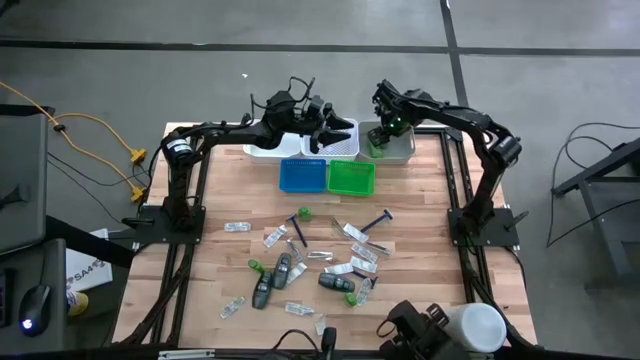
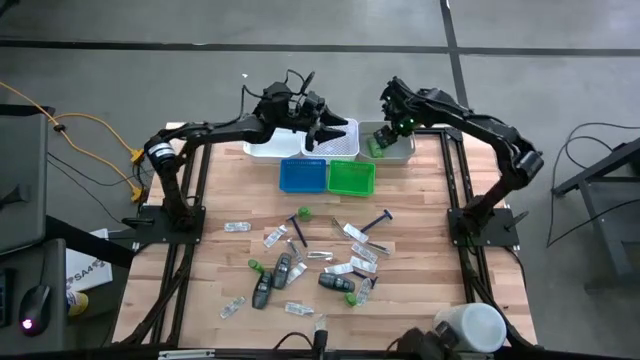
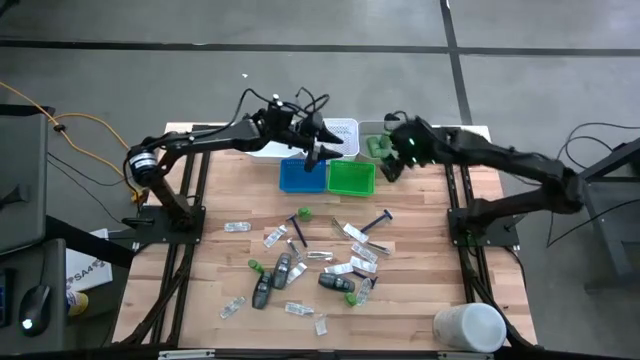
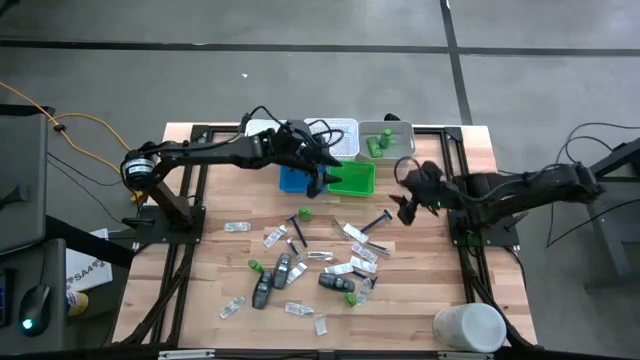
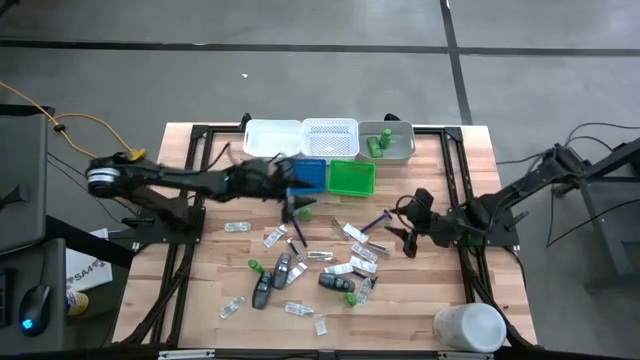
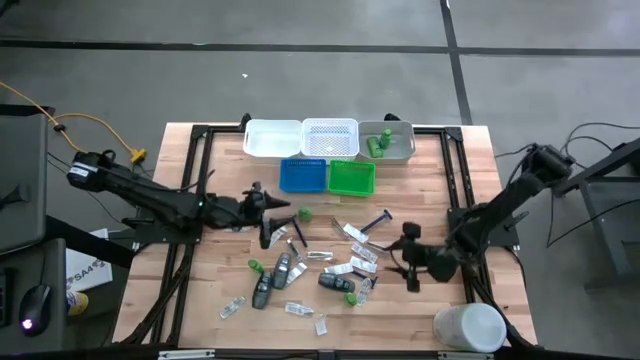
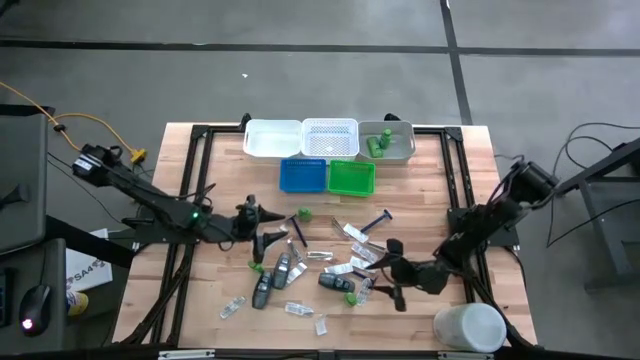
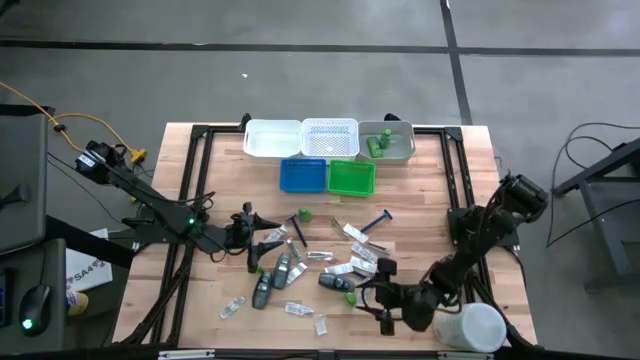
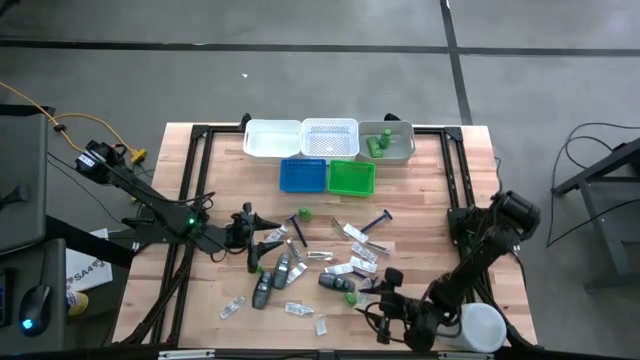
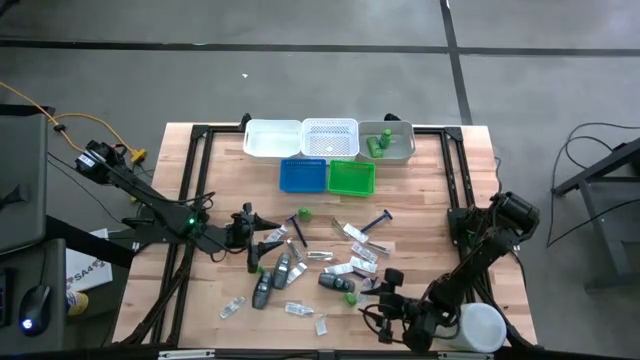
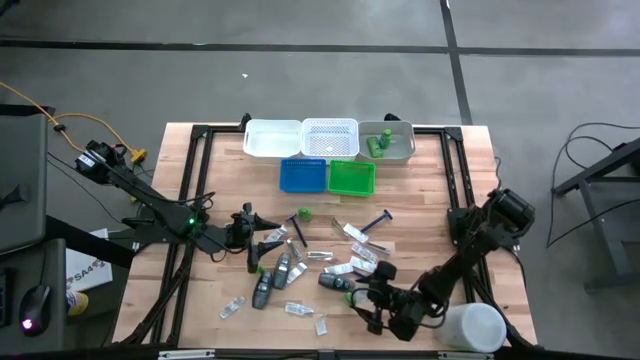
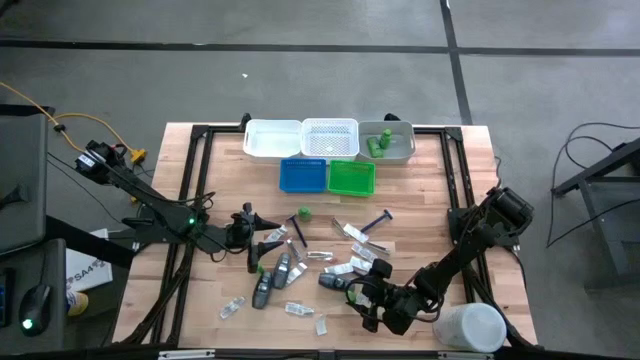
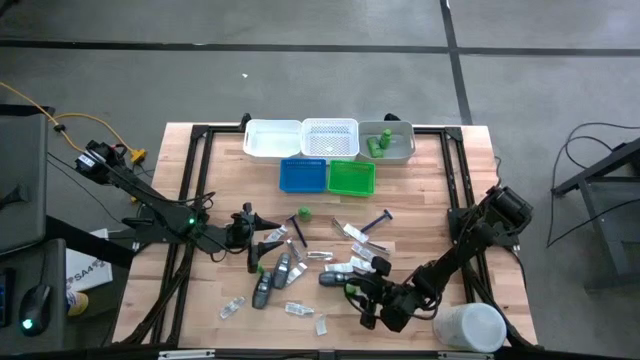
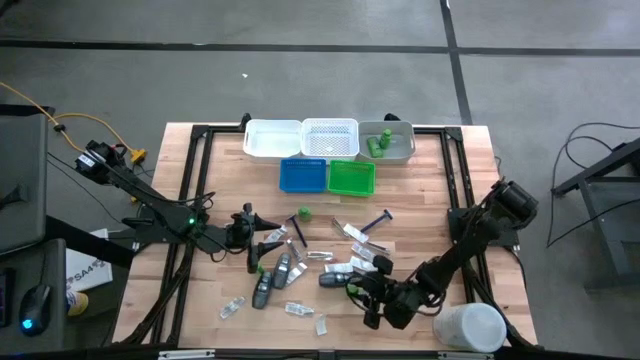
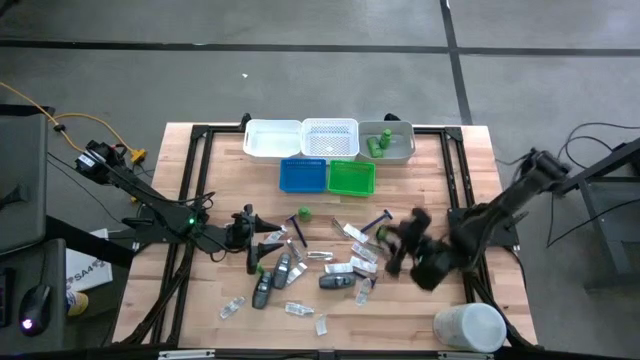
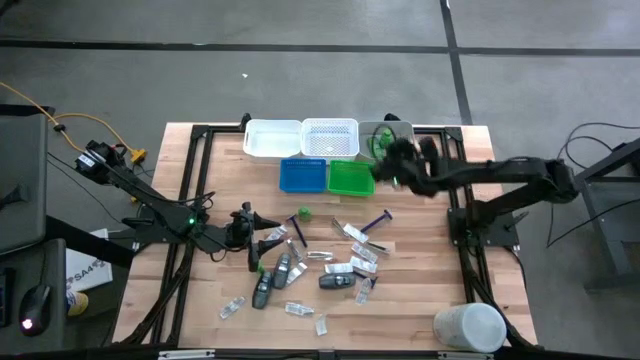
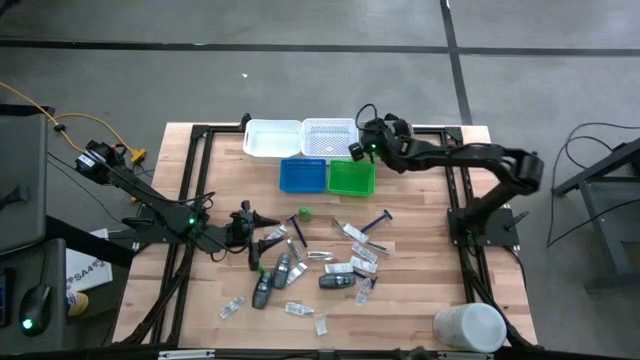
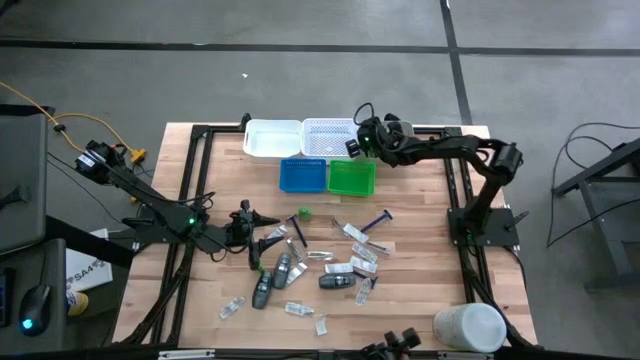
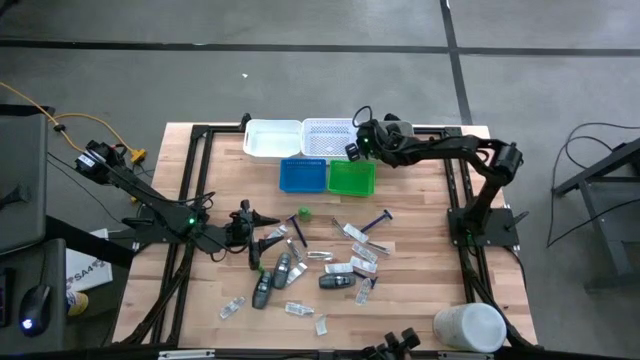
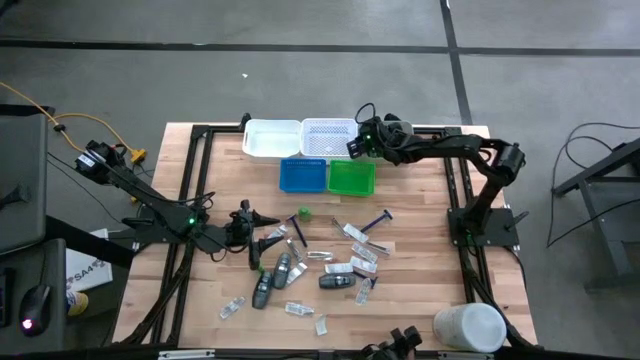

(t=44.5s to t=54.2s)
Task: Pick & Place Travel size toiletries
Put the green shampoo bottle into the gray bin

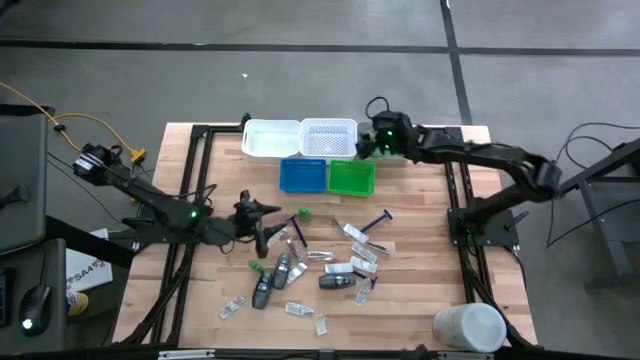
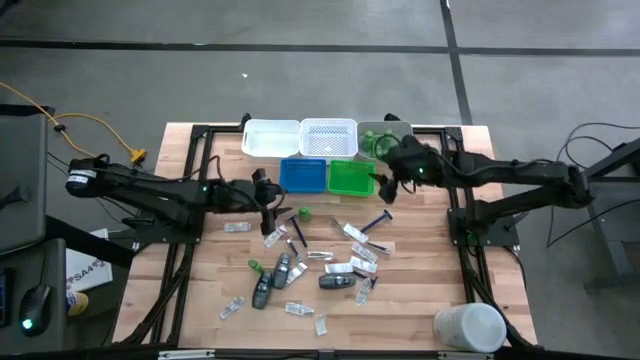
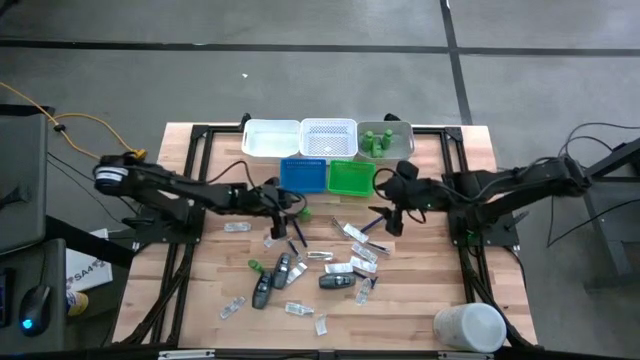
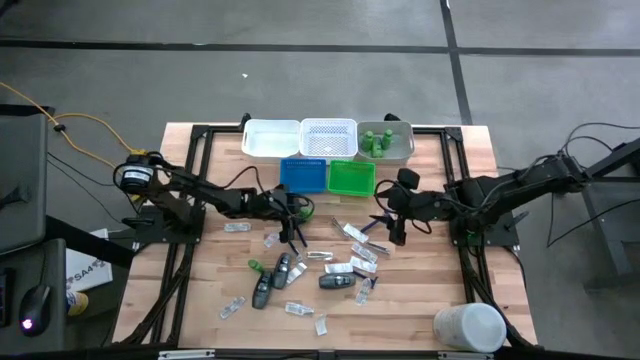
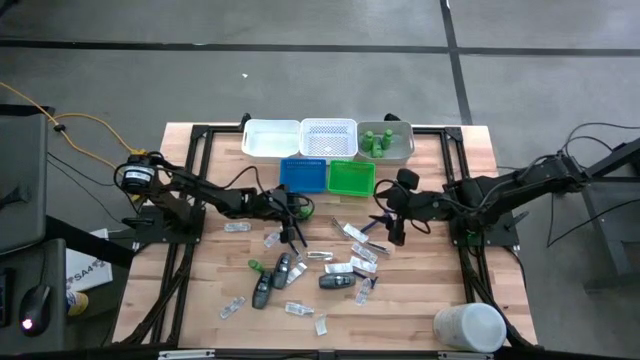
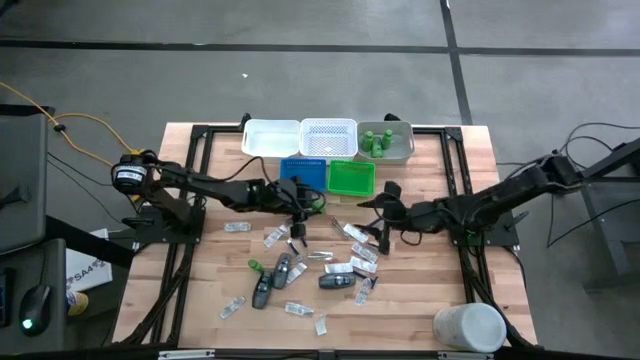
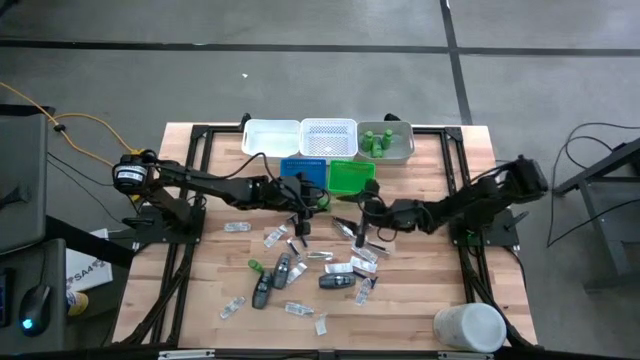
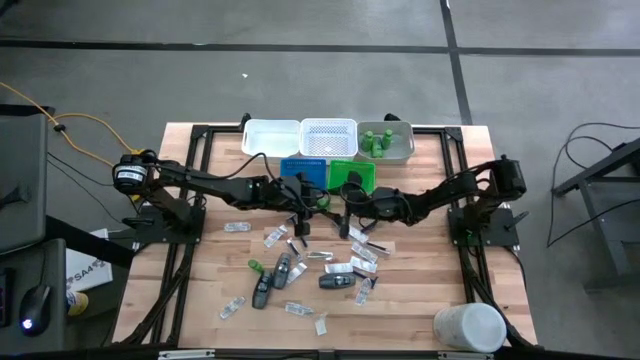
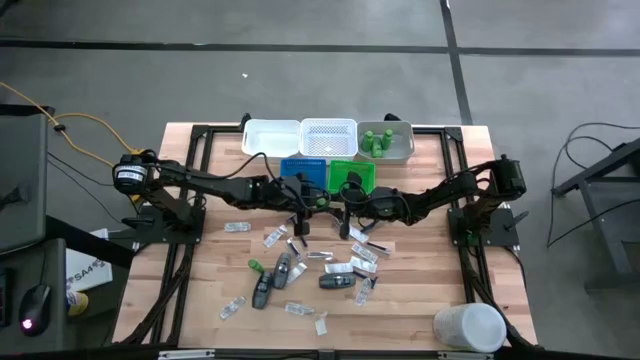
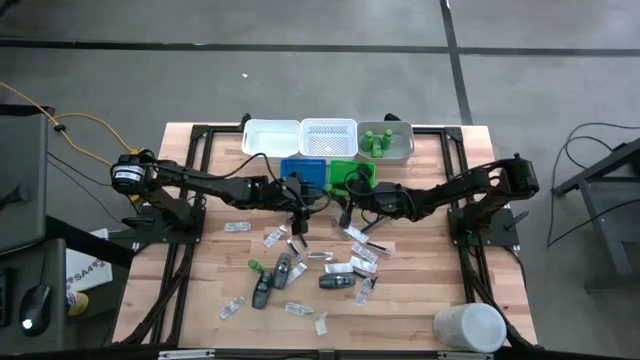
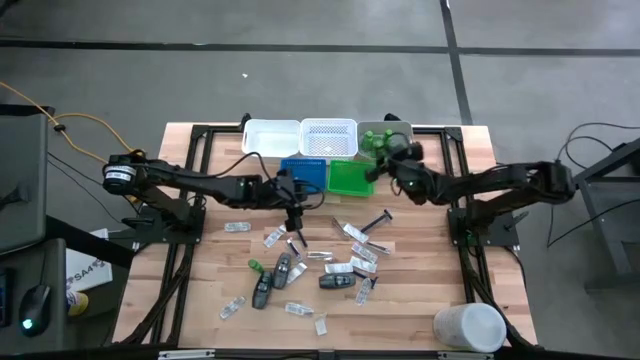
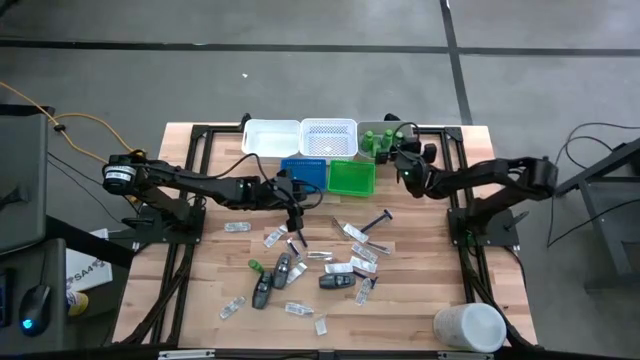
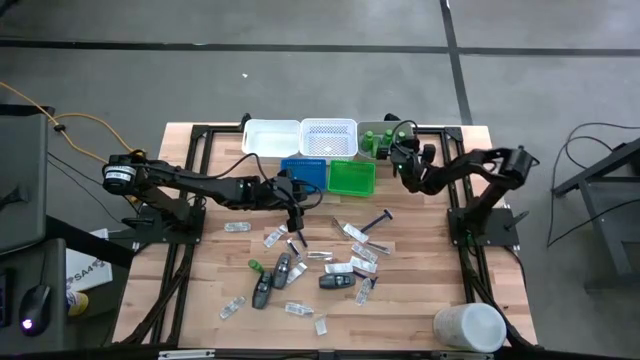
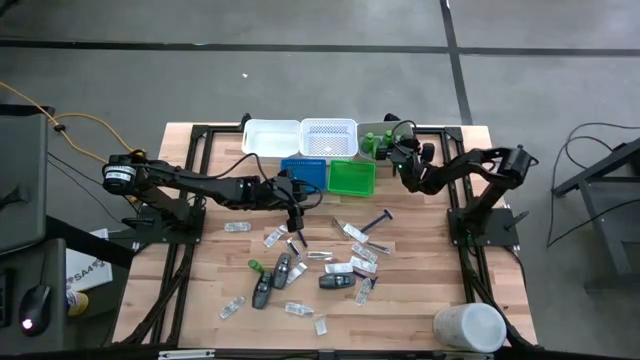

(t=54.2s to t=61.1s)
Put the green shampoo bottle into the gray bin

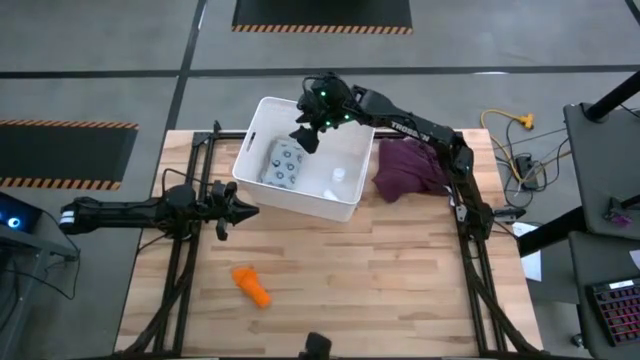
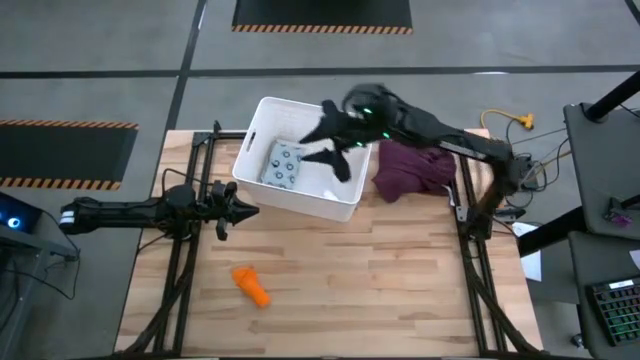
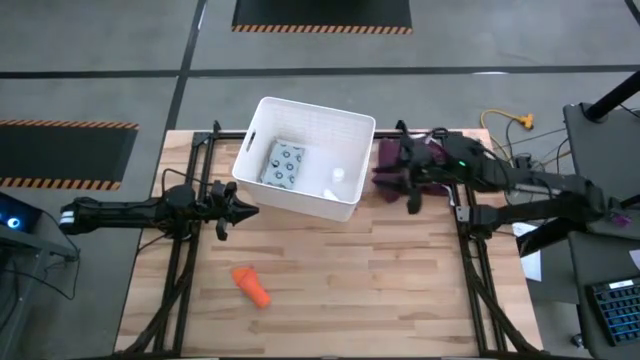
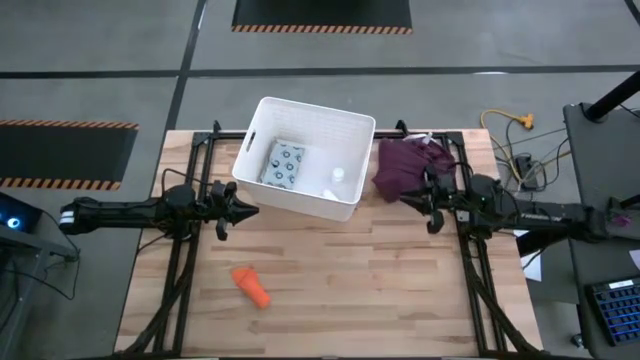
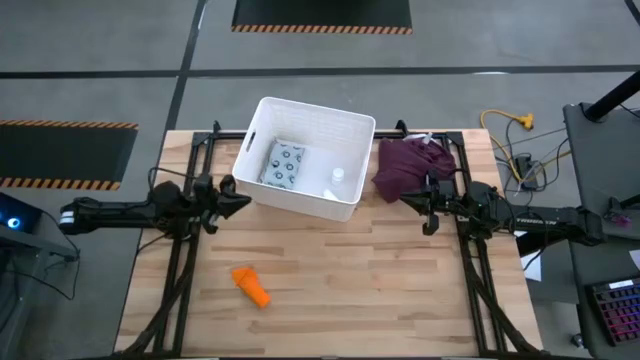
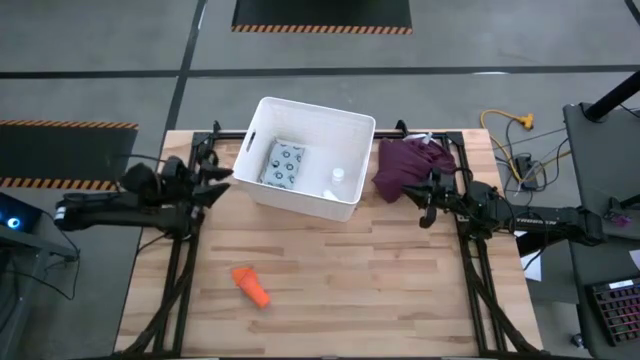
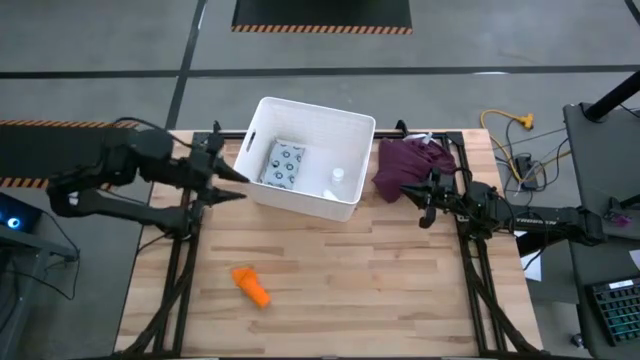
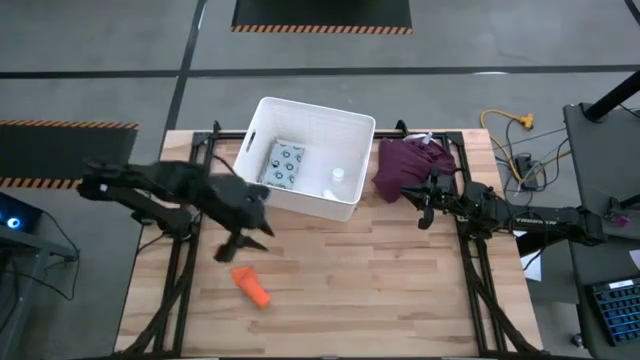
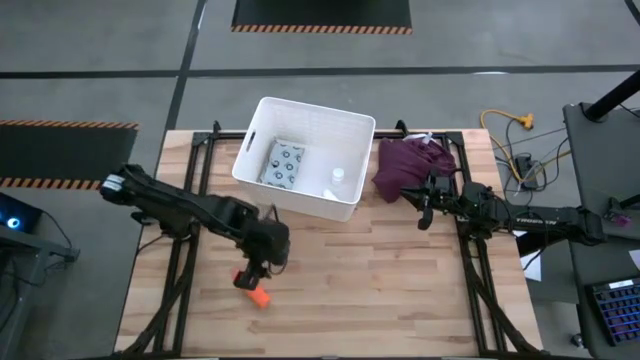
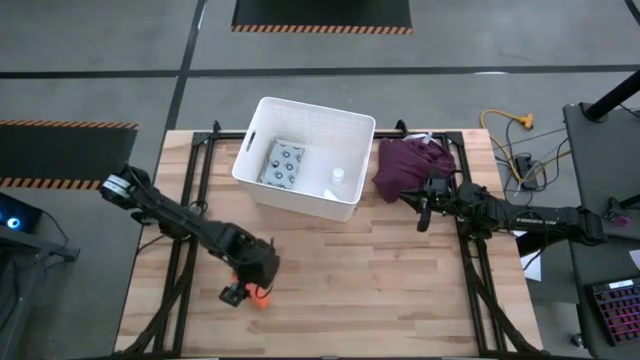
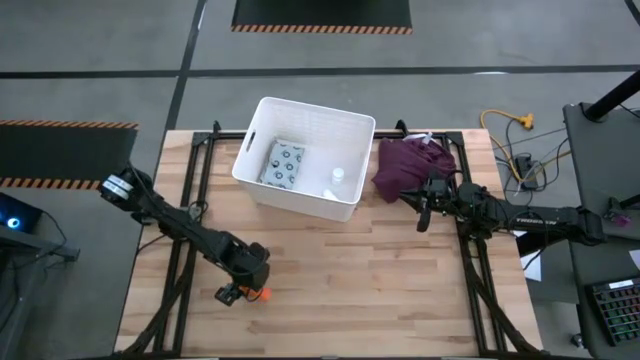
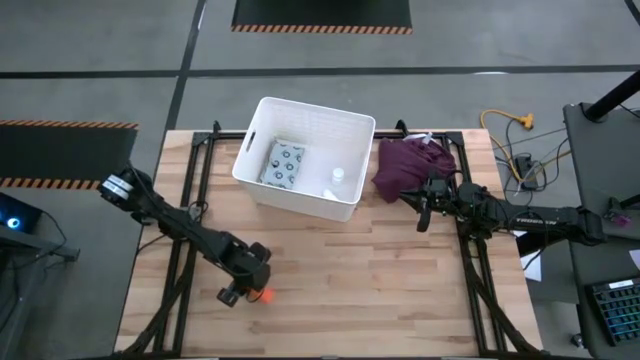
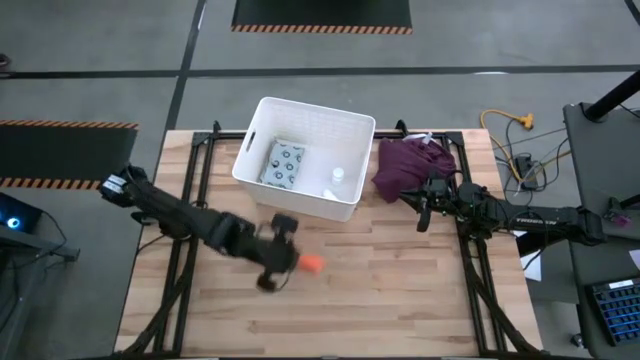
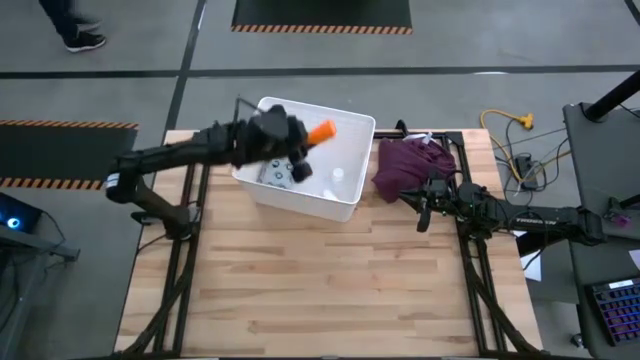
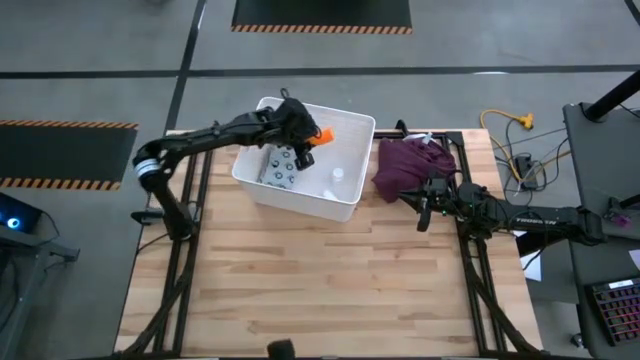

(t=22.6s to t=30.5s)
Task: Pick & place medical supplies in basket/bin
Put the orange bandage into the bin
